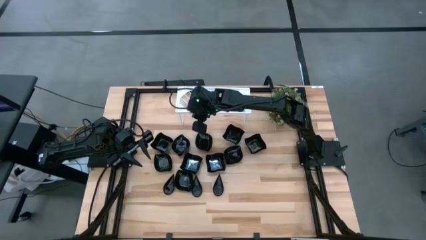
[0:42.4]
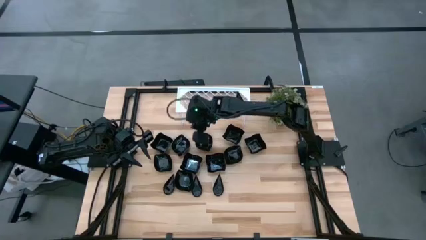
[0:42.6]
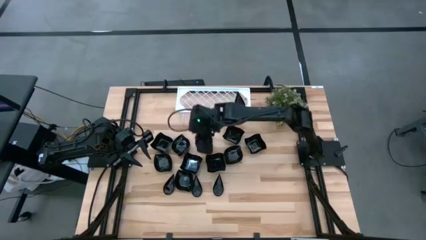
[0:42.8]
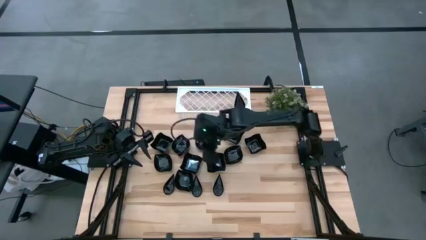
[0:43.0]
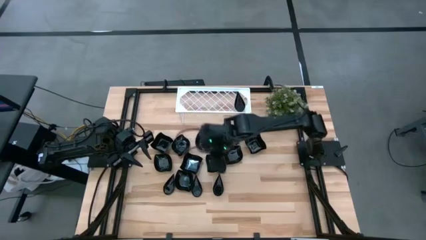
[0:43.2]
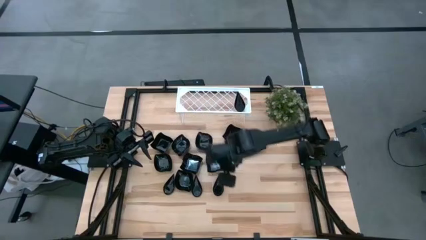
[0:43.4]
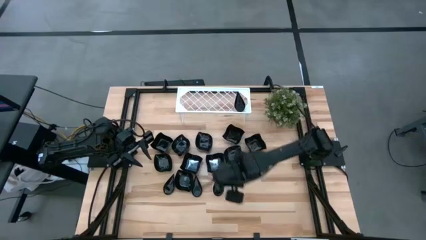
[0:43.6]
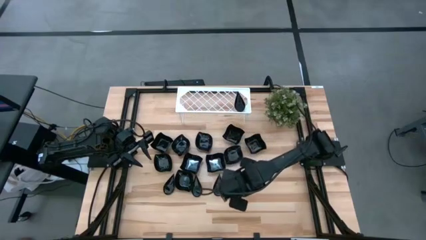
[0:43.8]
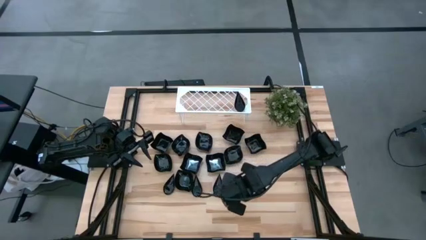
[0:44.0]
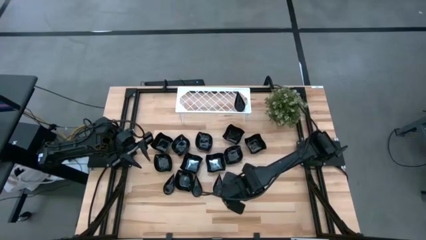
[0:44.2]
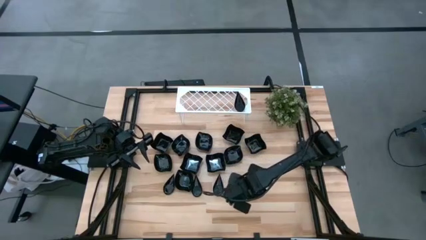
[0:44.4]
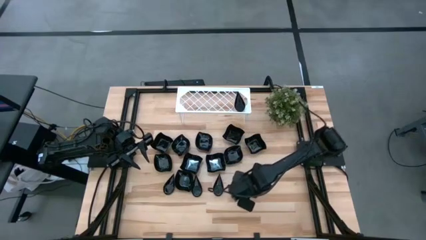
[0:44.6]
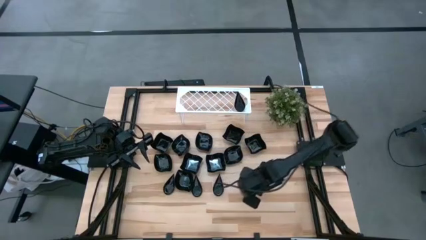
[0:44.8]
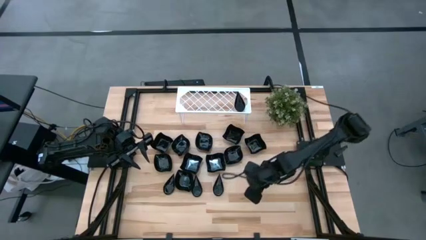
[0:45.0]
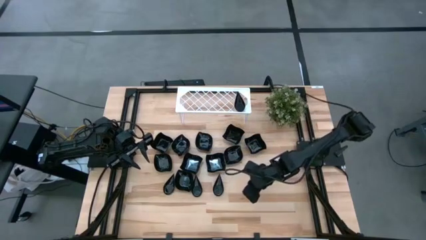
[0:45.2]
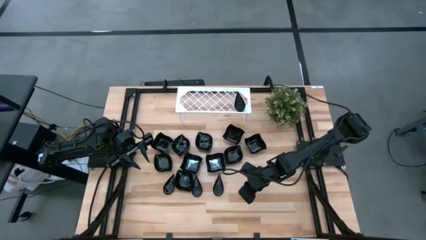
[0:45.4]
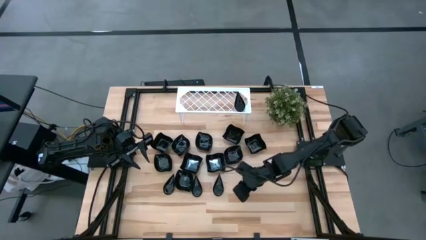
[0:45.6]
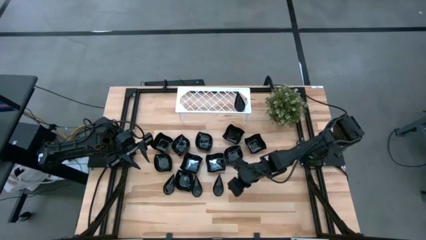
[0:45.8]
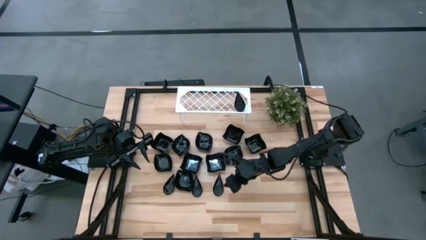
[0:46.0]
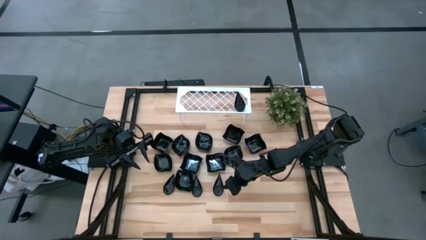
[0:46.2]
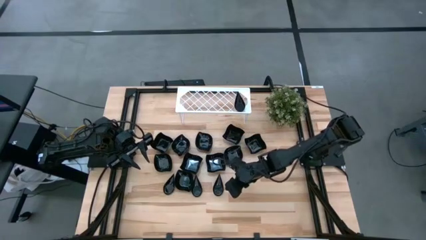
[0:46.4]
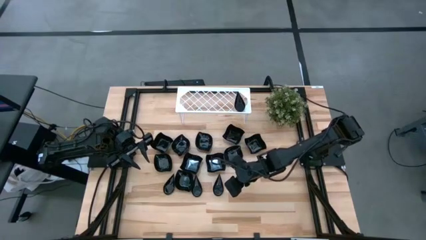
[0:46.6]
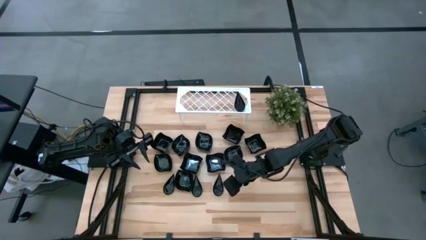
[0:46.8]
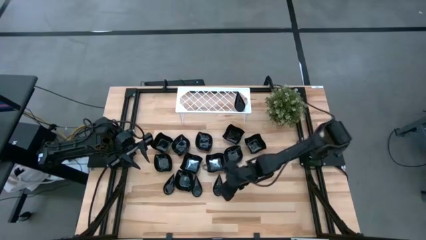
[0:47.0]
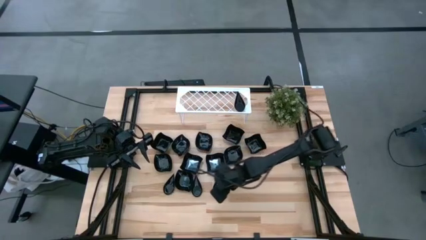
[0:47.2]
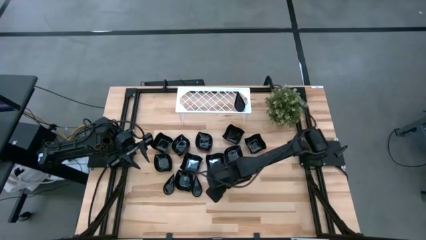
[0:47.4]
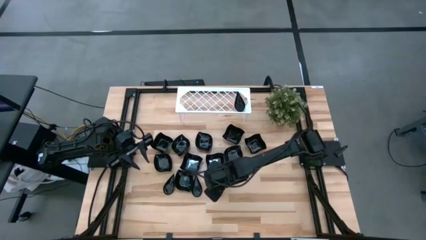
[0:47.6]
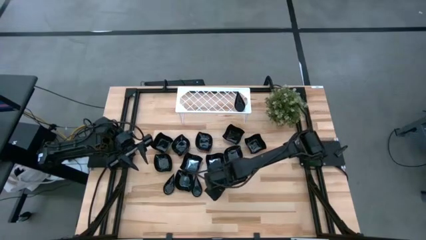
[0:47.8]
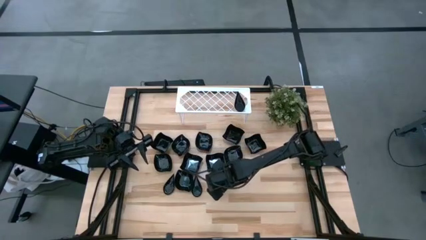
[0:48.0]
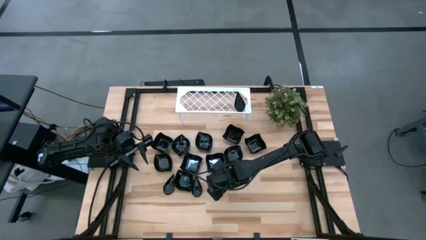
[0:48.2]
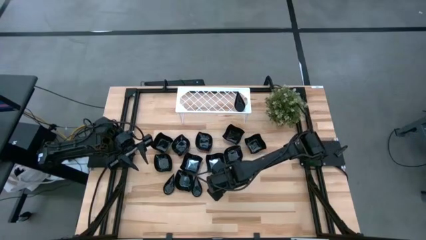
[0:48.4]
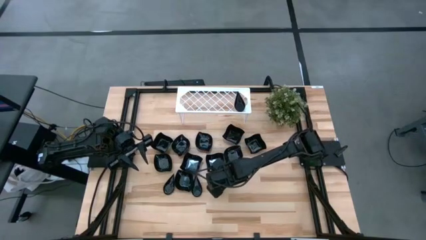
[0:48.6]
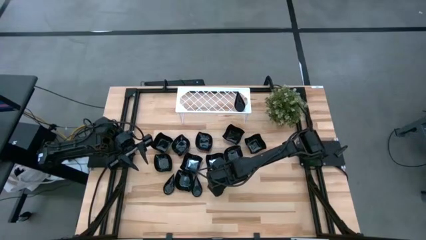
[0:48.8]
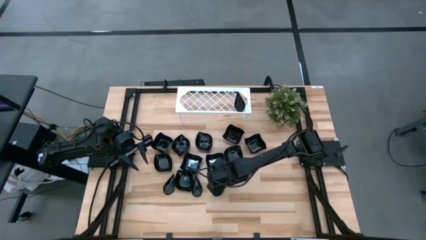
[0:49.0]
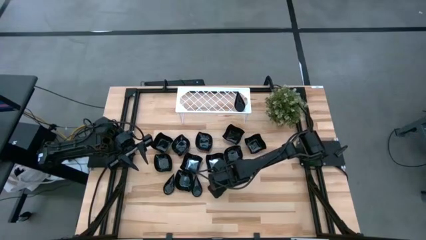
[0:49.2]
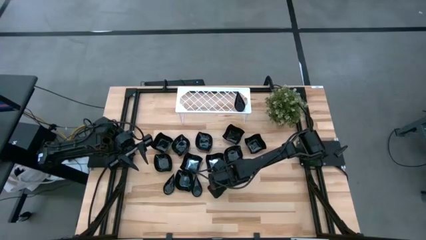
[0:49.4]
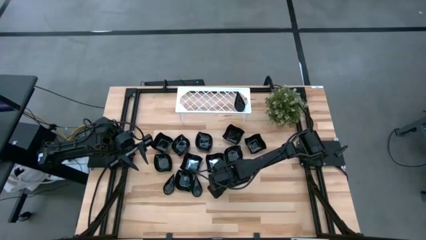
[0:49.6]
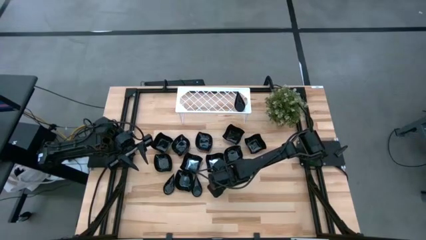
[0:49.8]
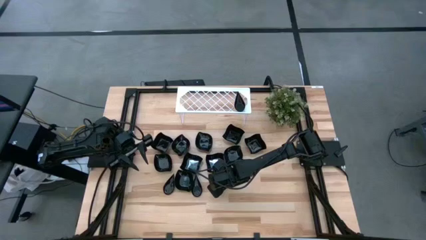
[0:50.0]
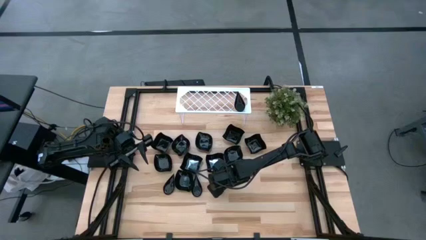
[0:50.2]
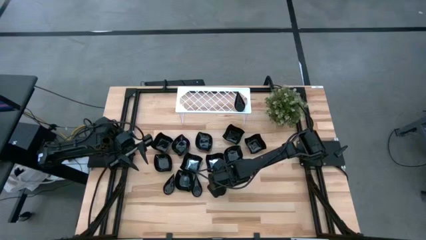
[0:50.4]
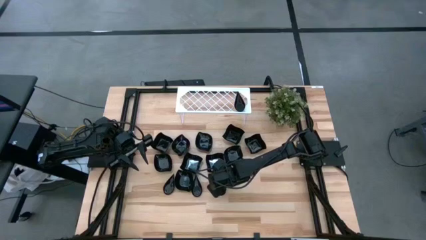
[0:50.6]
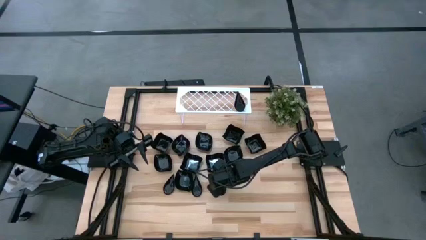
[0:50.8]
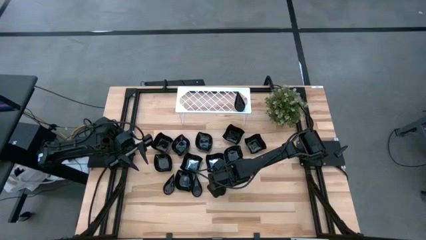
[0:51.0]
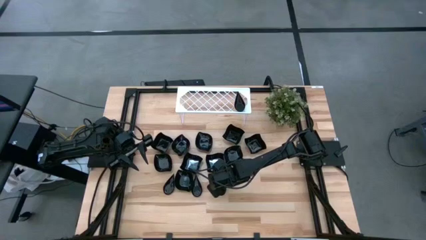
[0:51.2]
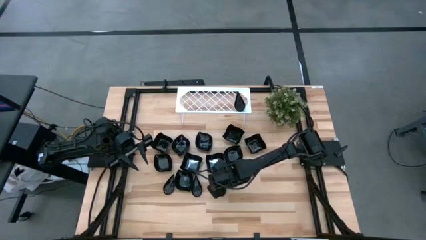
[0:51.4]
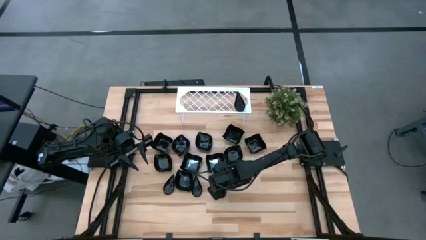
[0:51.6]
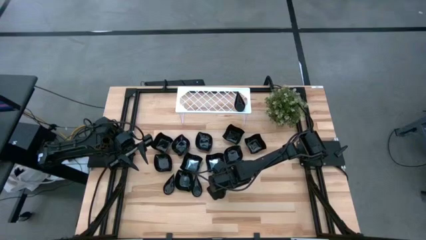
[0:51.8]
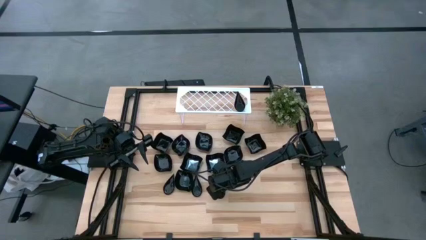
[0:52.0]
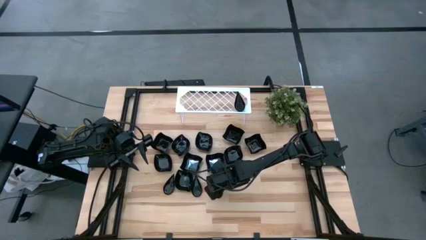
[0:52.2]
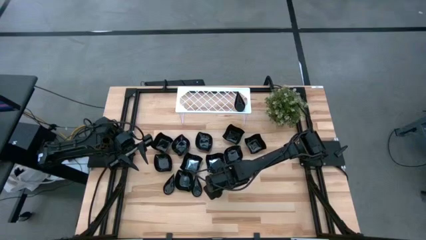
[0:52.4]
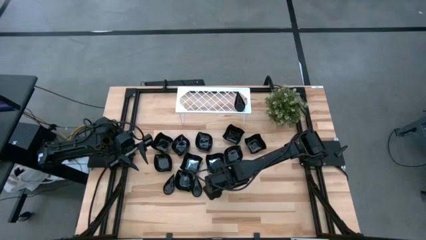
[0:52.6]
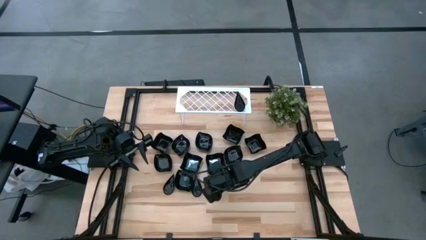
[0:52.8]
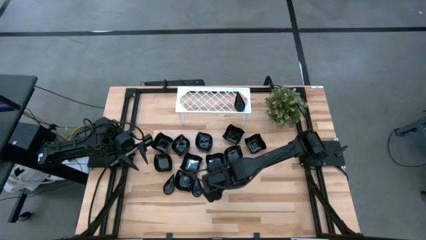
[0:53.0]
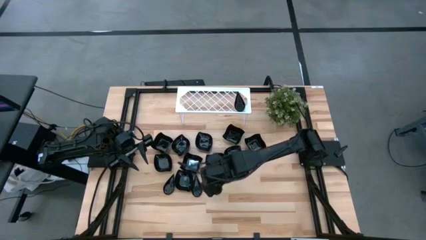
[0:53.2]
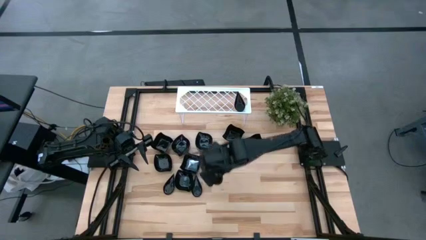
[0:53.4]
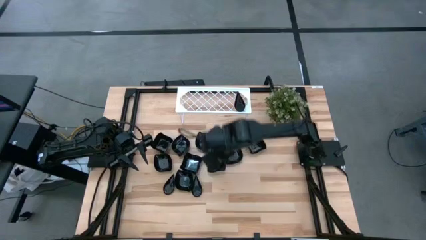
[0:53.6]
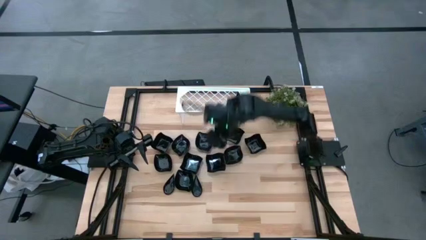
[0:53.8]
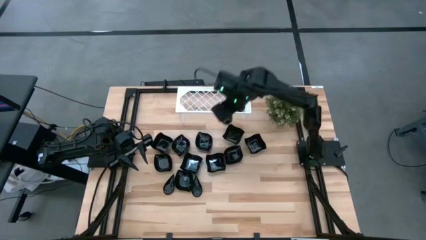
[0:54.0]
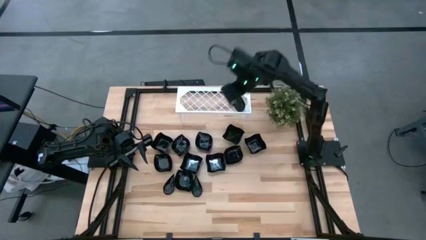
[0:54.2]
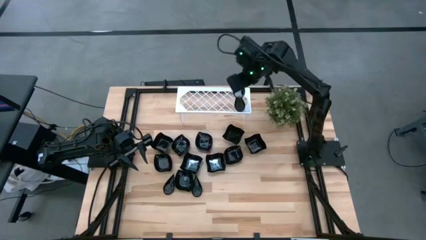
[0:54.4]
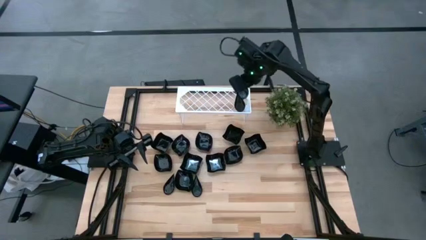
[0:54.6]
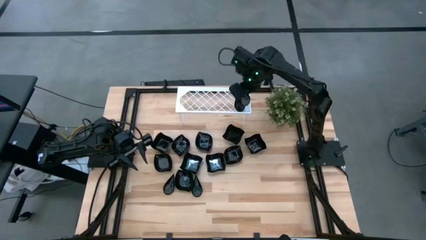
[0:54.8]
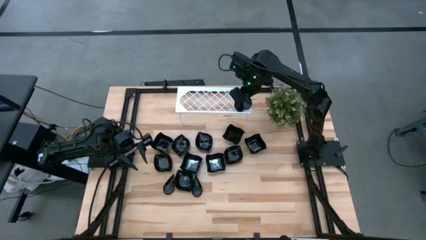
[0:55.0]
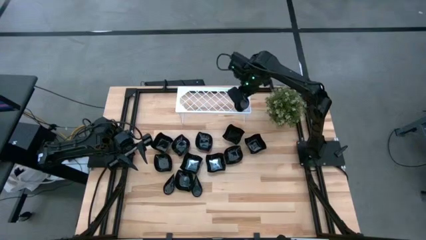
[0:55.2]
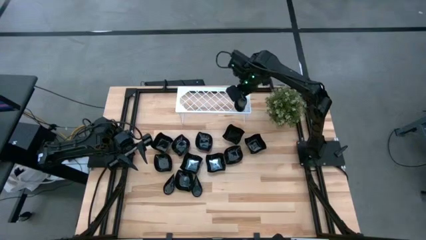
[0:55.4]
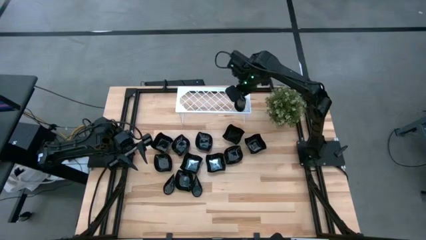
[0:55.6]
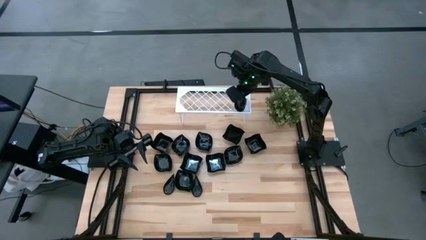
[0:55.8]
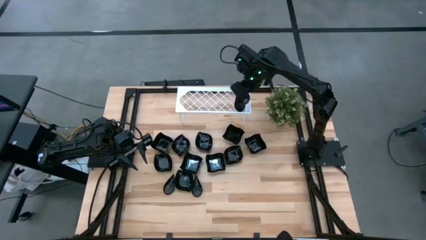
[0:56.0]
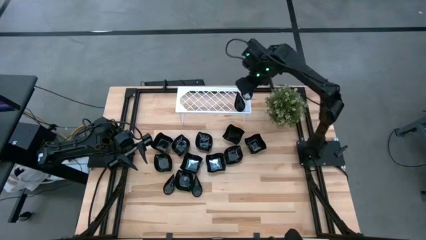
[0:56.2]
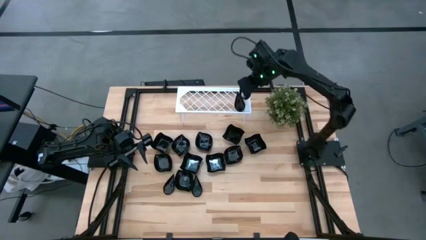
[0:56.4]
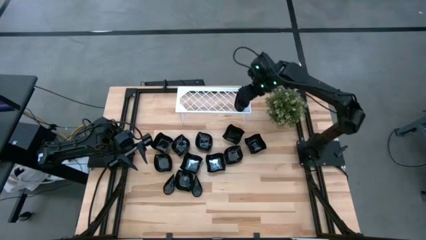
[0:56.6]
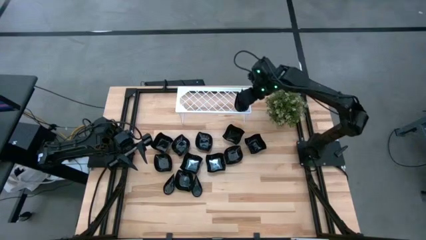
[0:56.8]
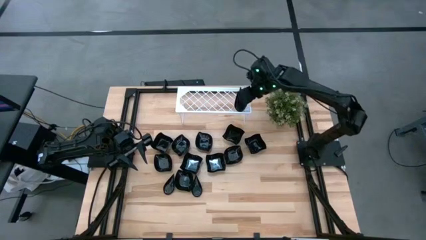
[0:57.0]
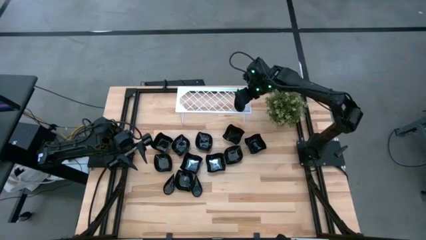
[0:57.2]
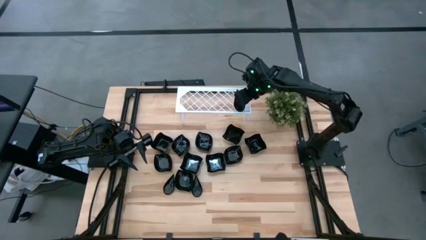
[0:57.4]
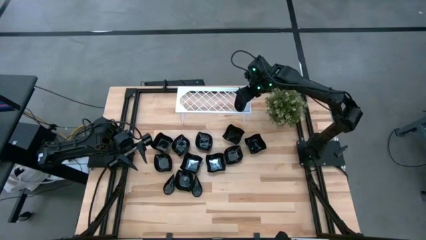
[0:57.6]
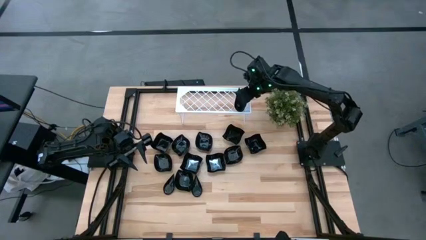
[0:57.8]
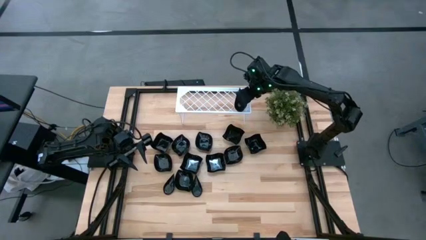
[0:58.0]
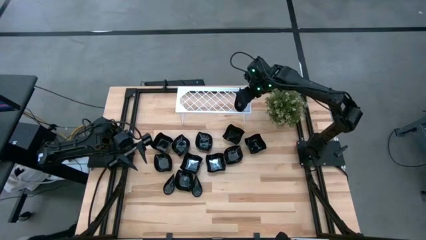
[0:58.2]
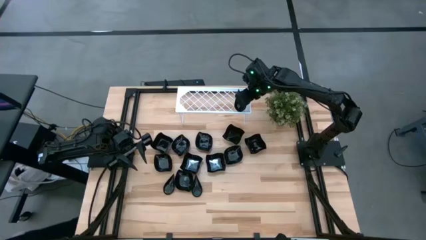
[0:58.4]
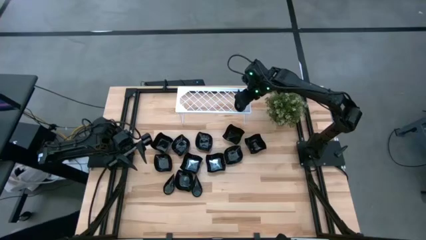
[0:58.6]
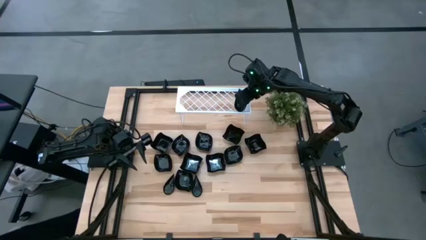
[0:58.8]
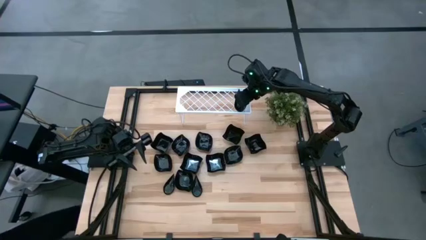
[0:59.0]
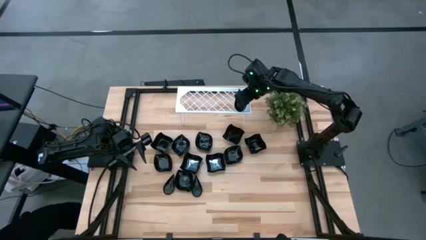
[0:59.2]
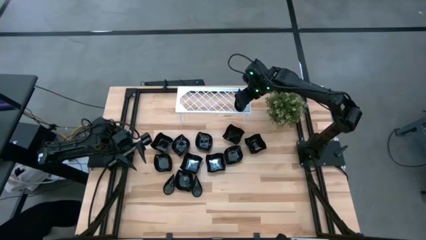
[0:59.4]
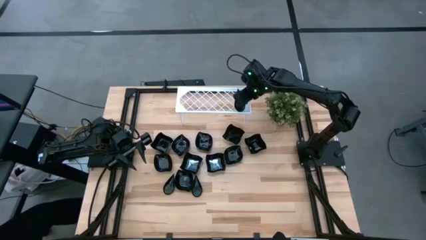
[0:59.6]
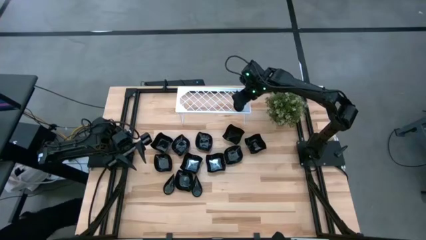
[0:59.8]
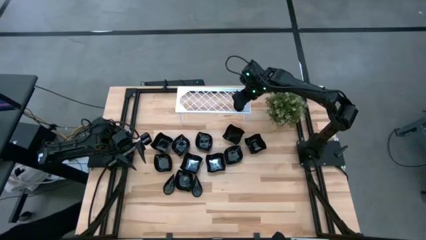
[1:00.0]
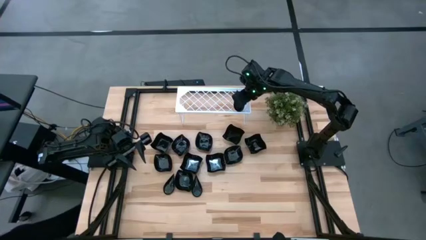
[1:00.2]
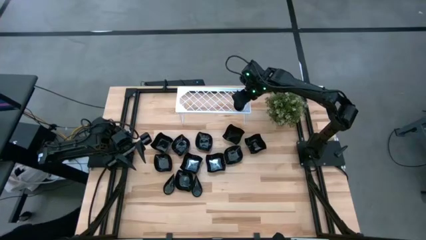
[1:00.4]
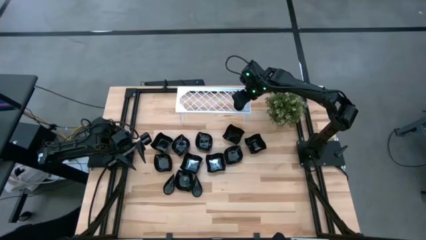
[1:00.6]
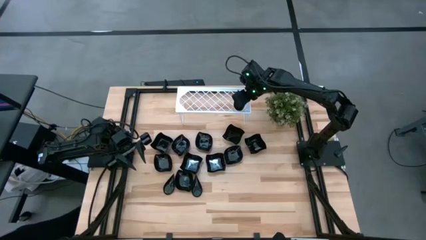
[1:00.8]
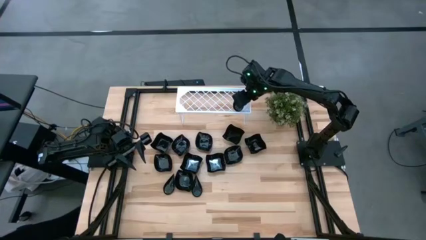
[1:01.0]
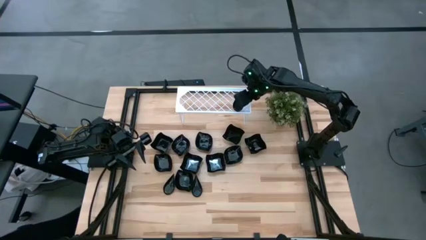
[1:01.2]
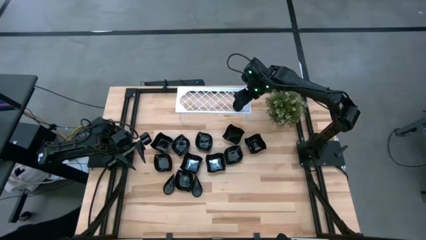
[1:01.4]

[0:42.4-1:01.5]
Task: Pick & Place Mini shaped plates
Stack the drop-shaped plate on top of the drop-shaped plate on the shelf
